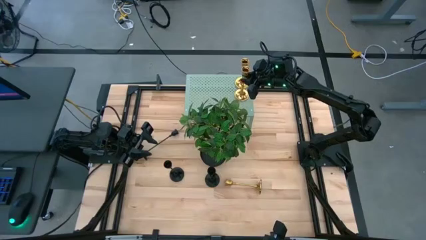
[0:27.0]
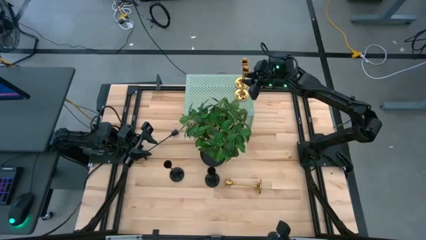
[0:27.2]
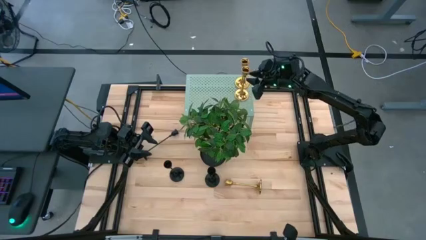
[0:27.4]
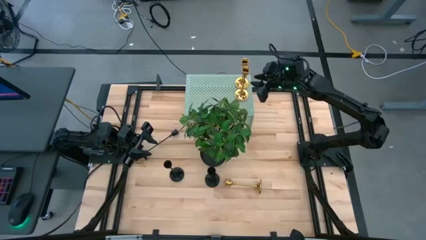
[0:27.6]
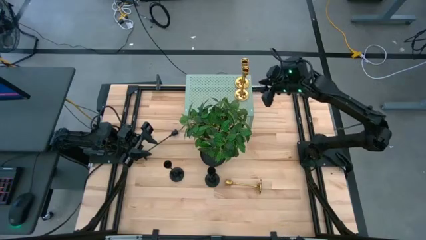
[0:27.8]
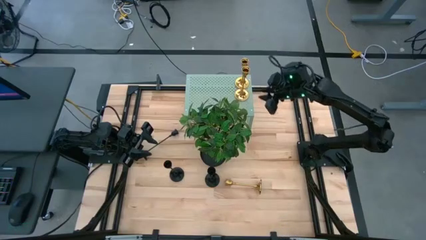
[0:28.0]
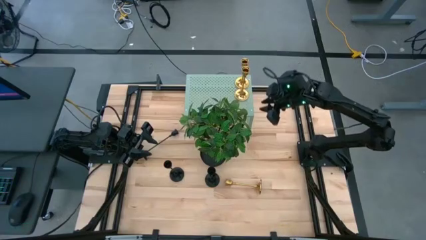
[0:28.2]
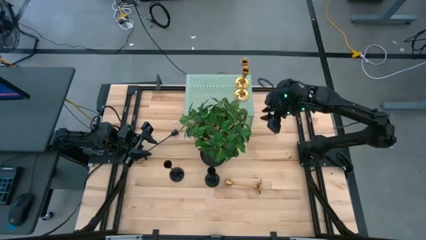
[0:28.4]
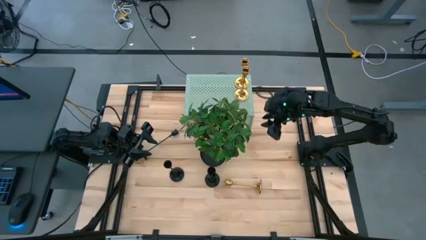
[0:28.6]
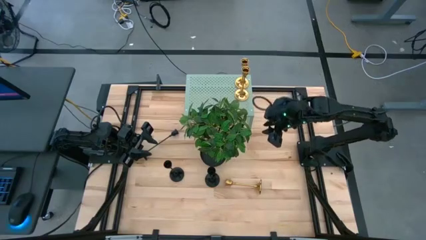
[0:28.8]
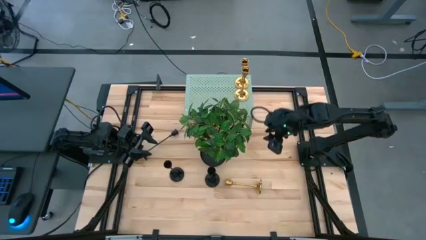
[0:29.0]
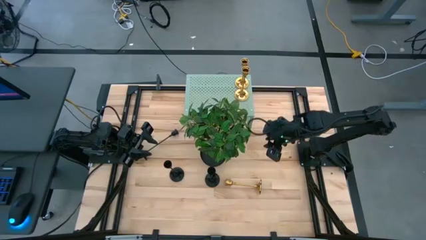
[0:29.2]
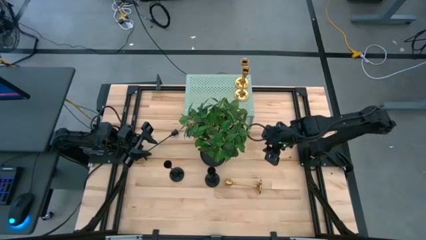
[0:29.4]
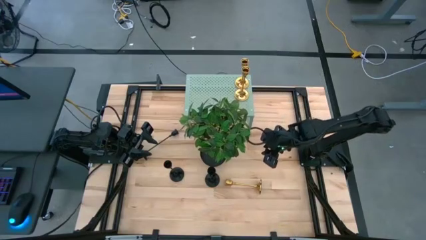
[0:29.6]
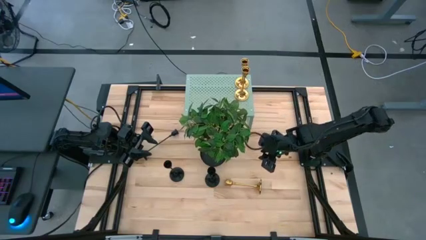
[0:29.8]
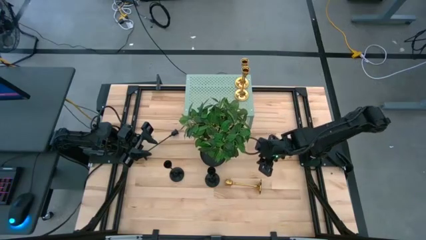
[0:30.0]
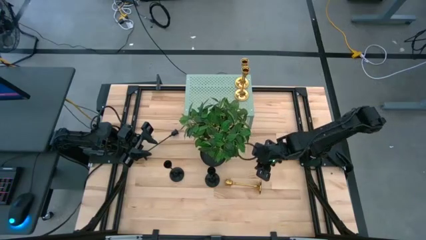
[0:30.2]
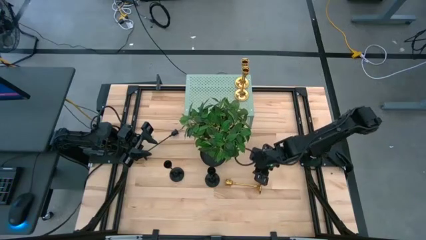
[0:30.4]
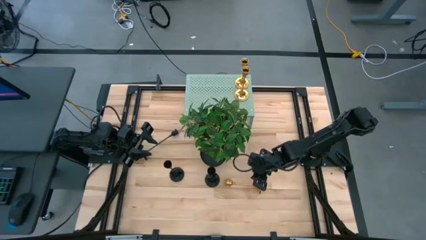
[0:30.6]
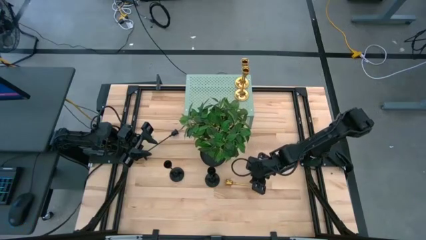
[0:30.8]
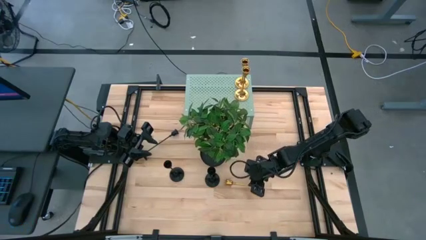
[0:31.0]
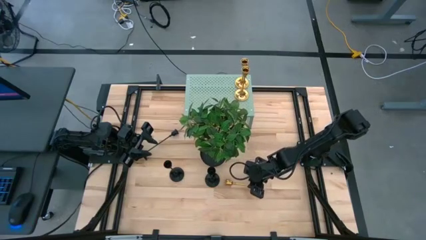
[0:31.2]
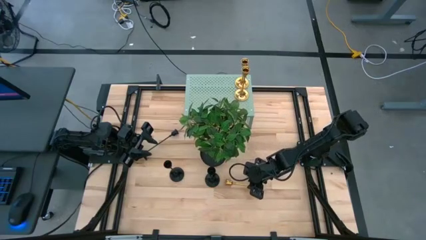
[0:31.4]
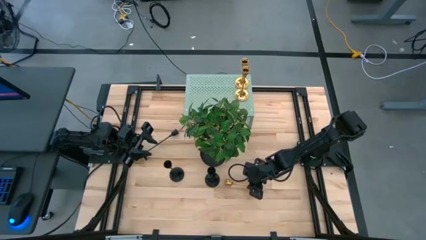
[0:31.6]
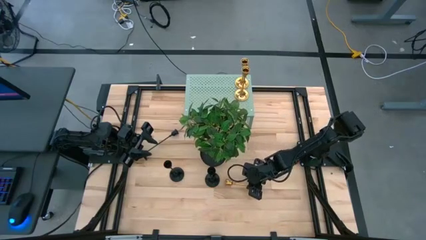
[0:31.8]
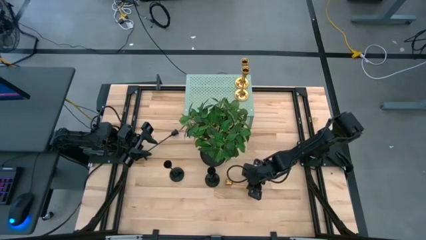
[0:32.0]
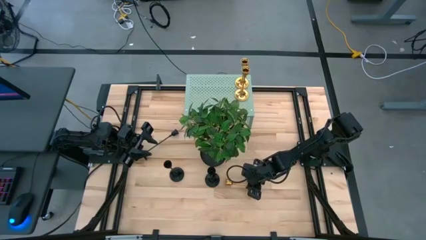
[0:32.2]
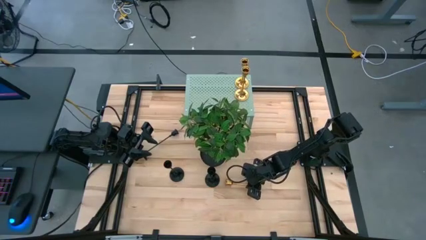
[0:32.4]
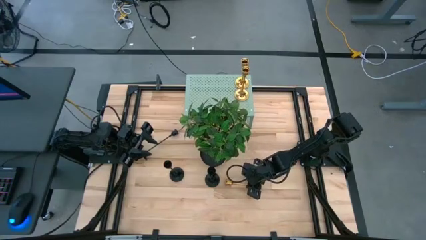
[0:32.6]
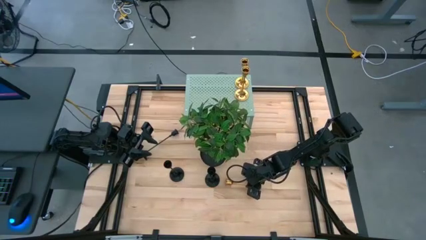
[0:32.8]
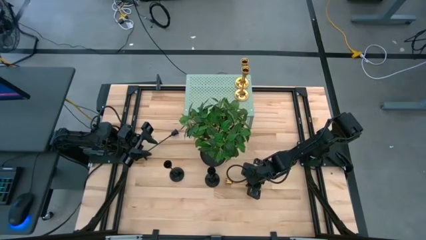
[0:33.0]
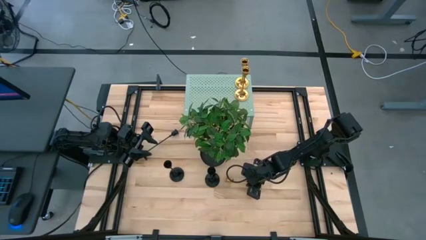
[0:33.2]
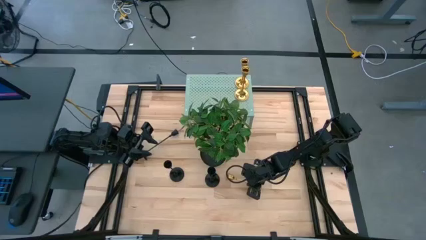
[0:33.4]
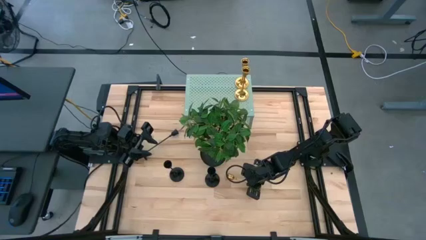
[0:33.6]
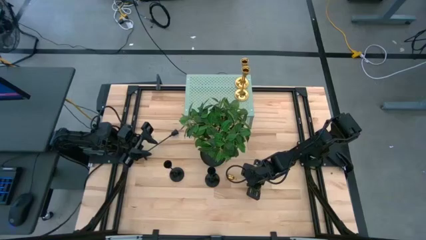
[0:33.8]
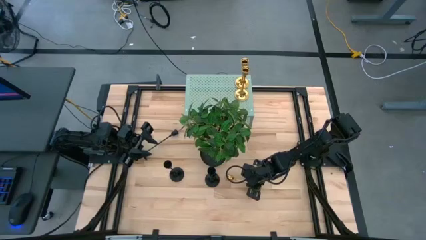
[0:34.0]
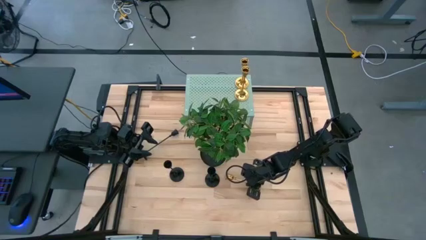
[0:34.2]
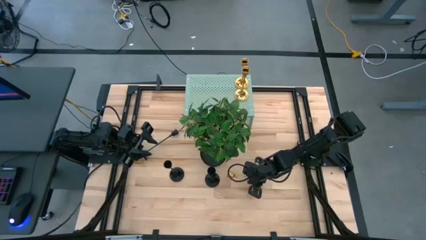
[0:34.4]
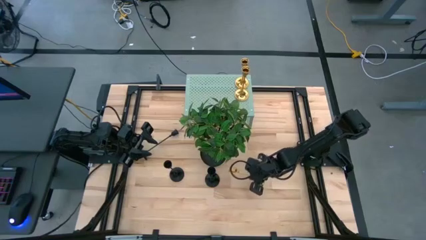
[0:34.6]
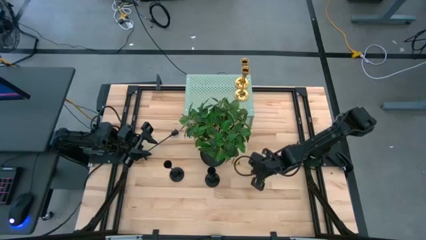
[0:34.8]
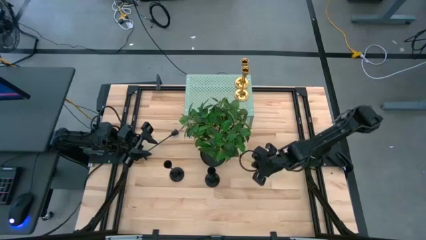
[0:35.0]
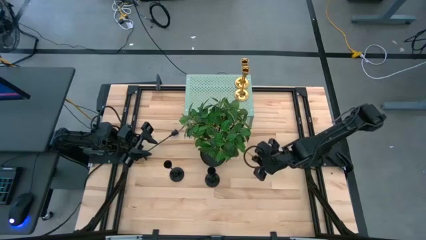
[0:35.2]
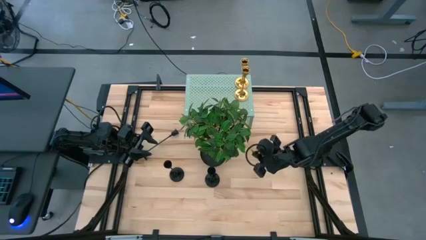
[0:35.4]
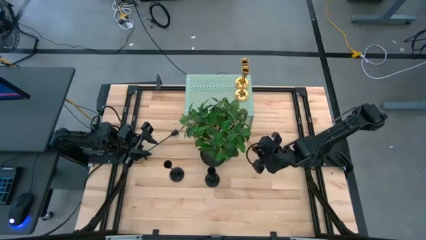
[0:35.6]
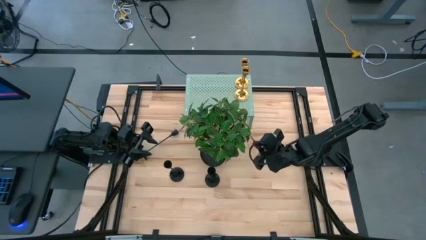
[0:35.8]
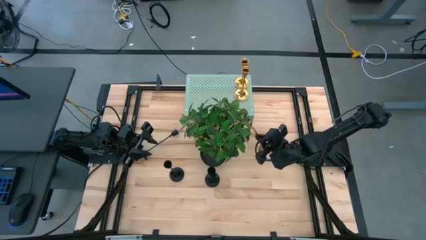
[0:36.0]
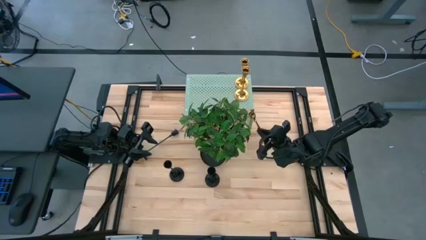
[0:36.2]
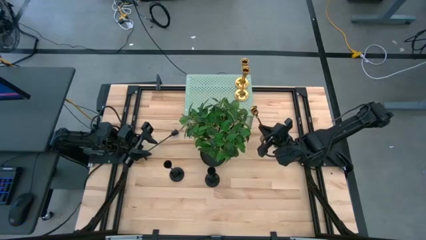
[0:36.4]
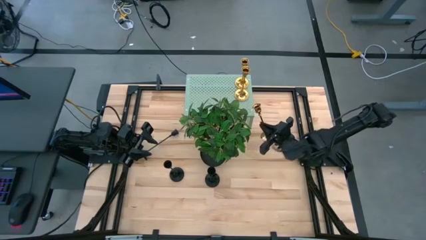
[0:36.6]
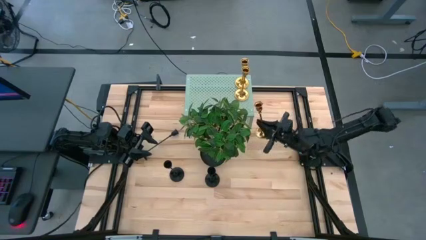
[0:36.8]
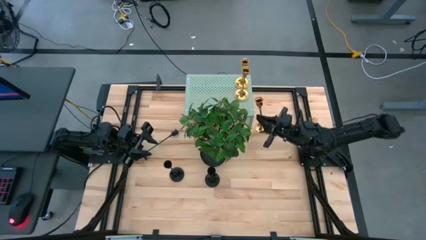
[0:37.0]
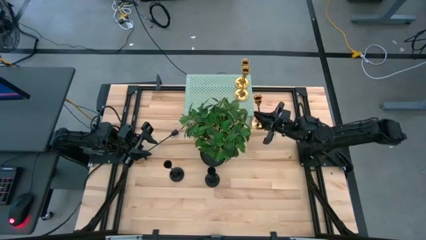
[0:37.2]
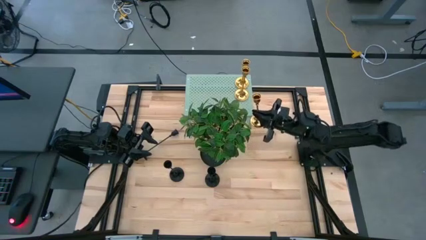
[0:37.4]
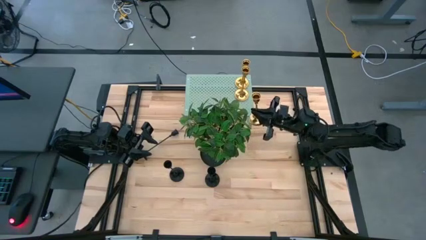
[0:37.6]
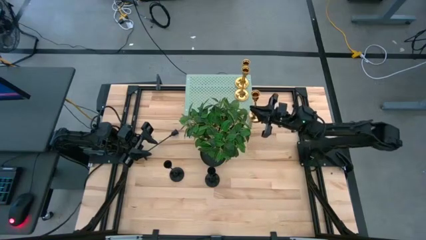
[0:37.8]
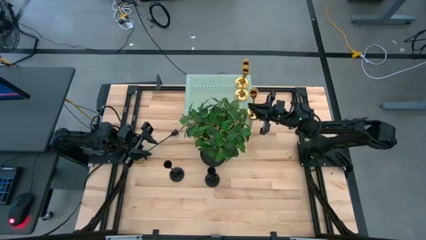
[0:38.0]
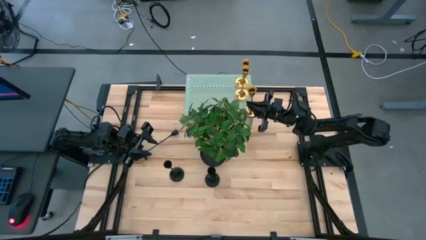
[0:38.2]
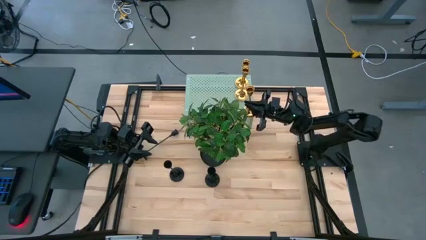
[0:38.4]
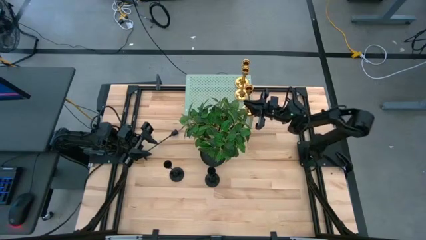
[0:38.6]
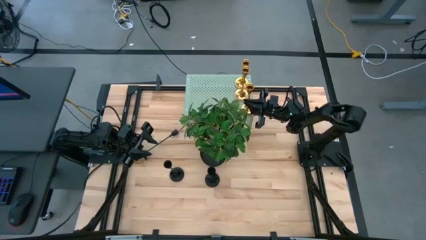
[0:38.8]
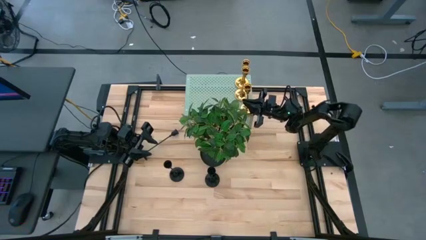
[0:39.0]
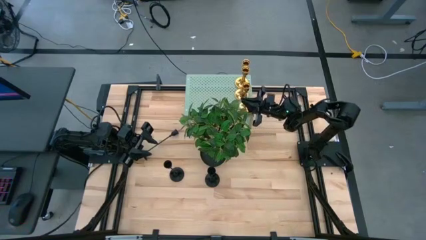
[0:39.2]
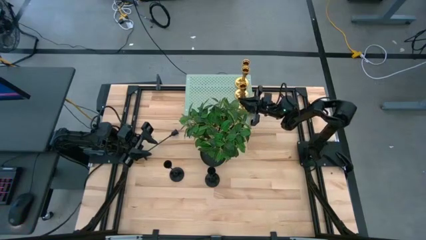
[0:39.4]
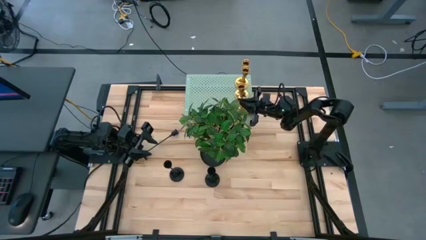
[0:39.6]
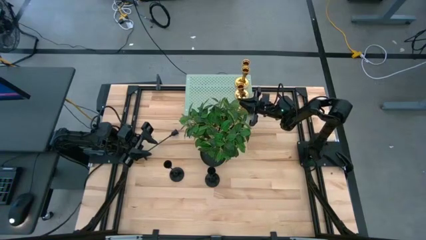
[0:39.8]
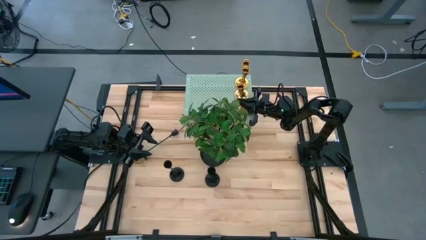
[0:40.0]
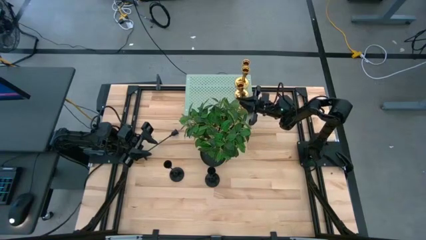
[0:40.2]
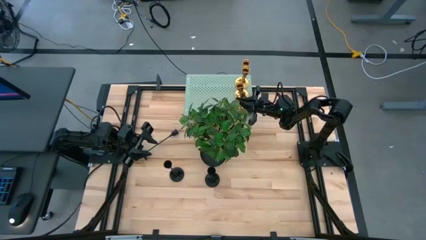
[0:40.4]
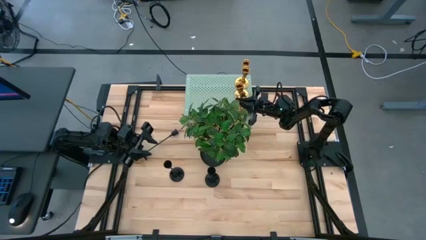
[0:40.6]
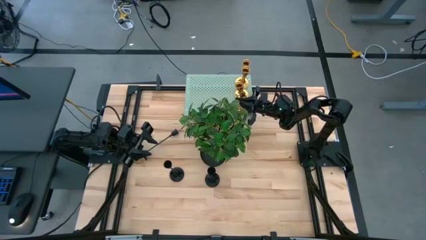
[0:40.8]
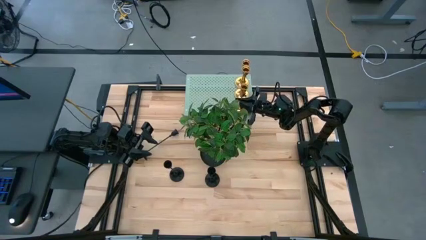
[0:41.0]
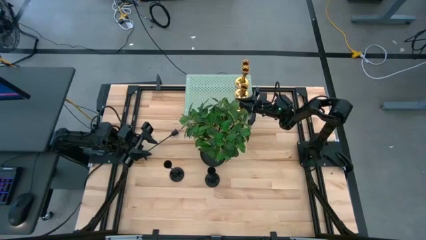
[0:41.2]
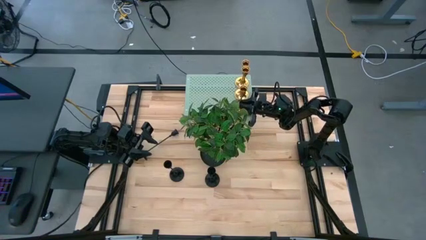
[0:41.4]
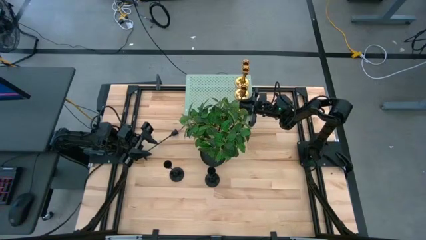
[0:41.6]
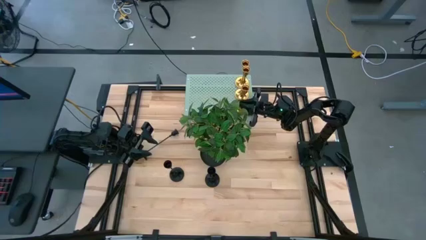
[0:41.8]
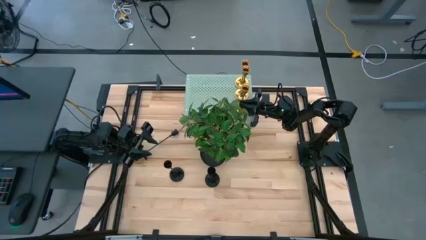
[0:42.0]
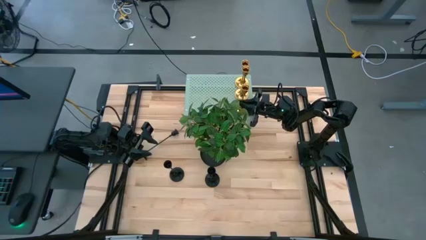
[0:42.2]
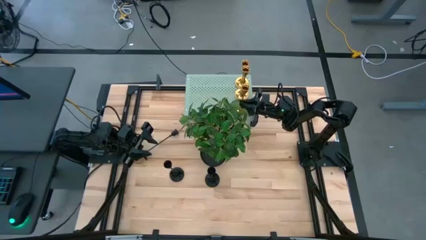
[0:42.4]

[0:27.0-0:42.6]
Task: Pick & Place candle stick holders
Put the gold candle holder on the shelf aligned with the other gold candle holders
